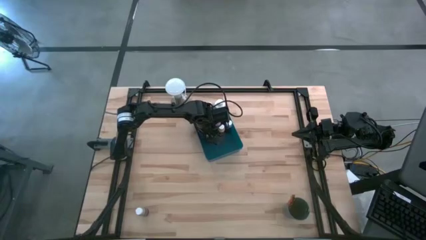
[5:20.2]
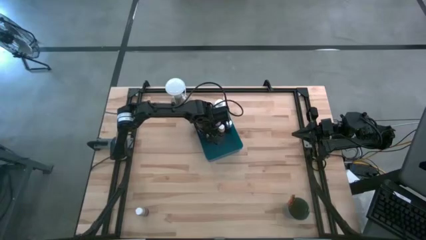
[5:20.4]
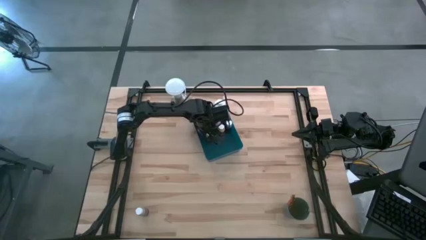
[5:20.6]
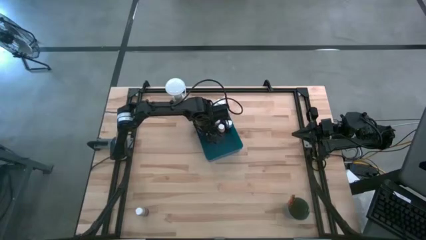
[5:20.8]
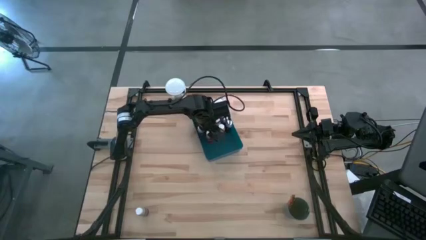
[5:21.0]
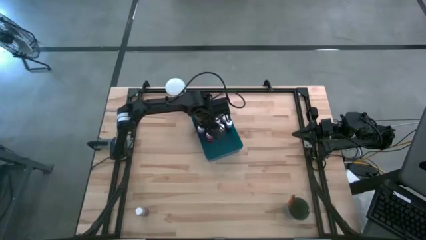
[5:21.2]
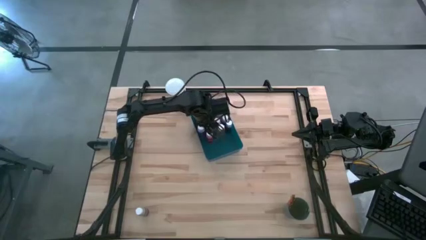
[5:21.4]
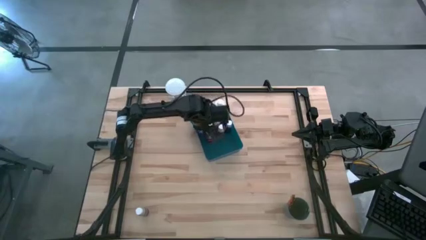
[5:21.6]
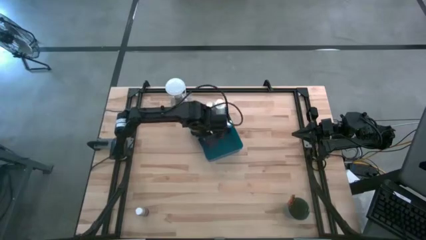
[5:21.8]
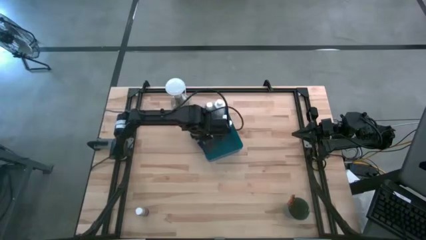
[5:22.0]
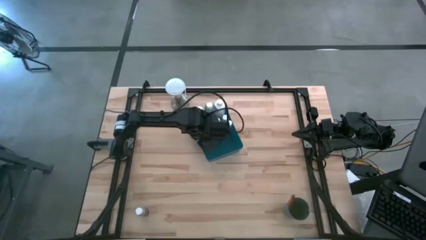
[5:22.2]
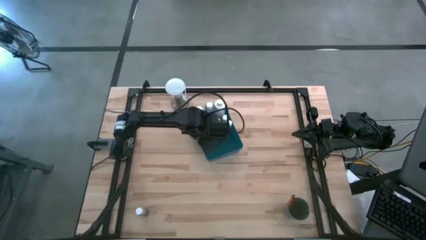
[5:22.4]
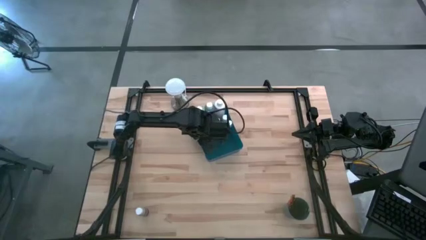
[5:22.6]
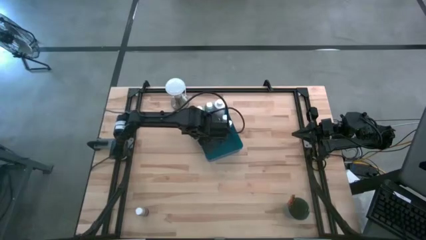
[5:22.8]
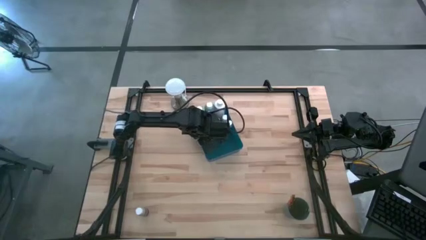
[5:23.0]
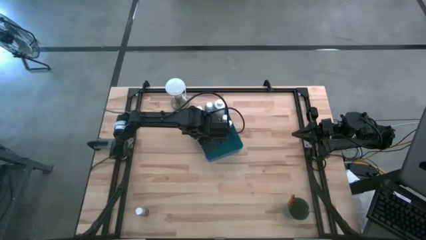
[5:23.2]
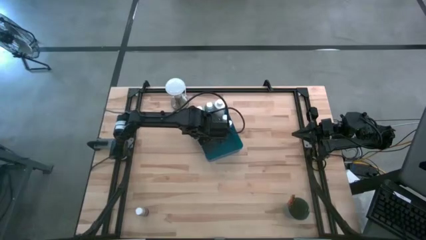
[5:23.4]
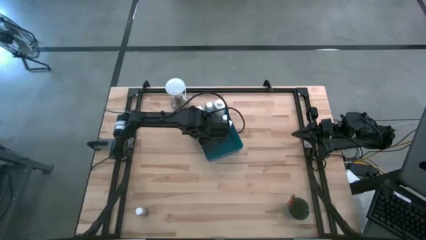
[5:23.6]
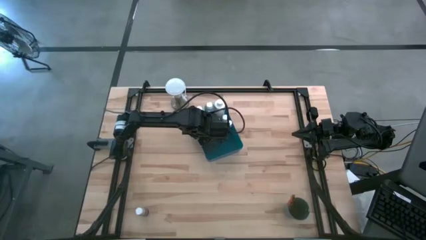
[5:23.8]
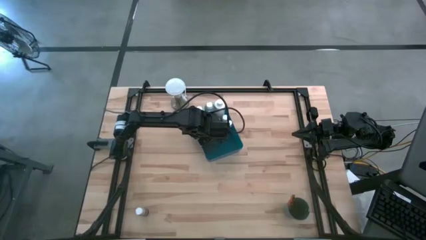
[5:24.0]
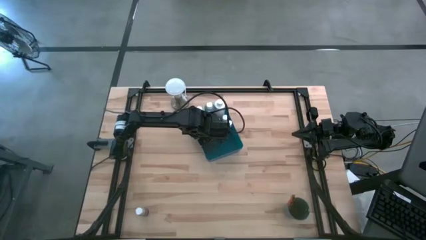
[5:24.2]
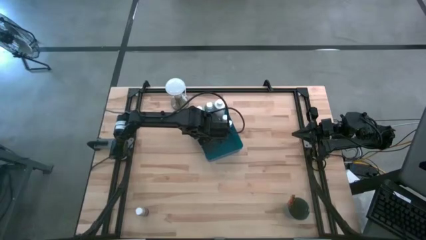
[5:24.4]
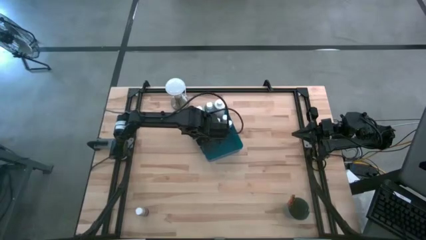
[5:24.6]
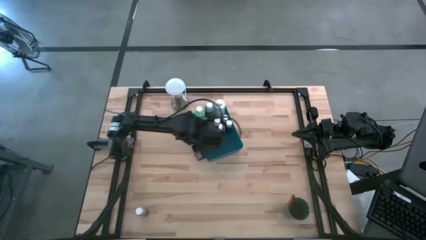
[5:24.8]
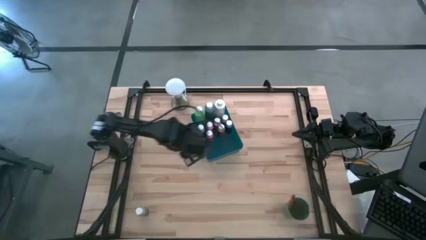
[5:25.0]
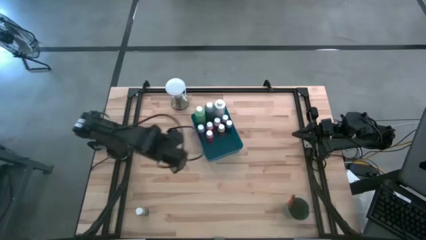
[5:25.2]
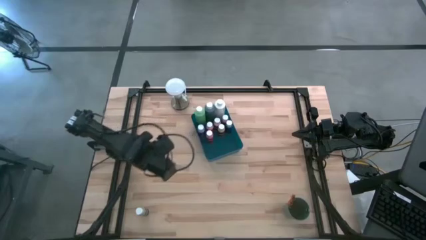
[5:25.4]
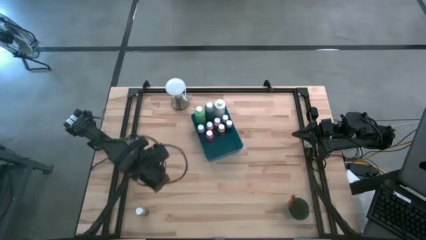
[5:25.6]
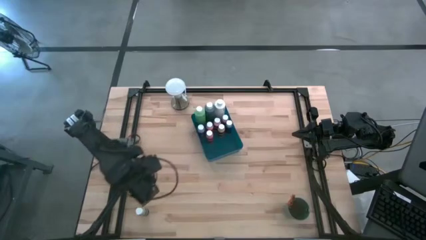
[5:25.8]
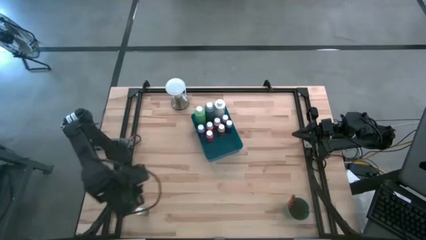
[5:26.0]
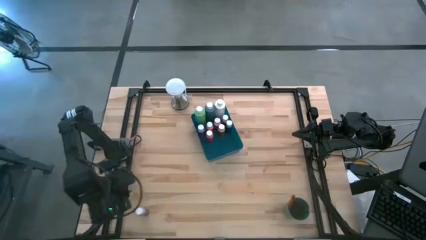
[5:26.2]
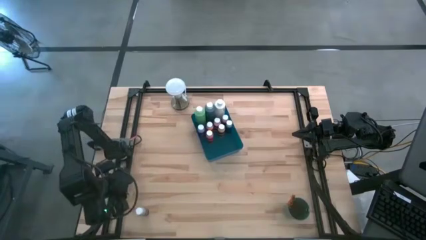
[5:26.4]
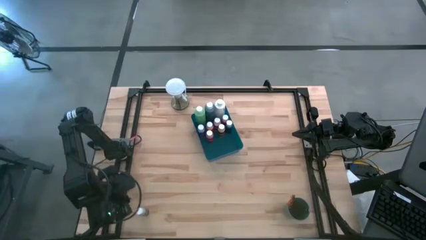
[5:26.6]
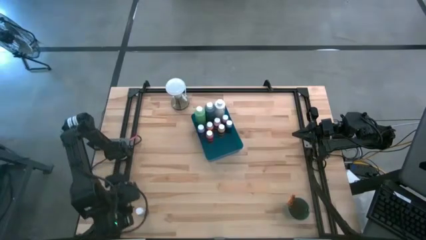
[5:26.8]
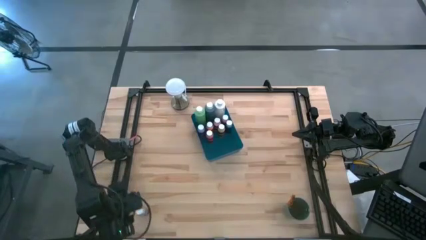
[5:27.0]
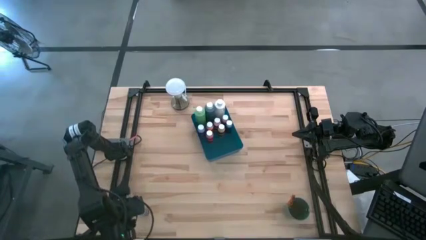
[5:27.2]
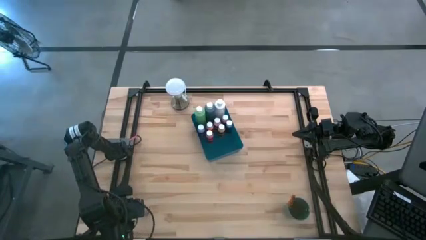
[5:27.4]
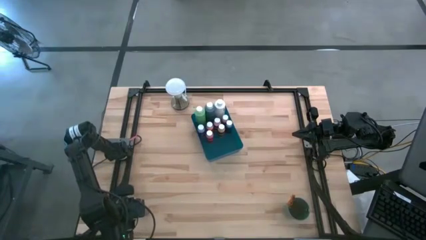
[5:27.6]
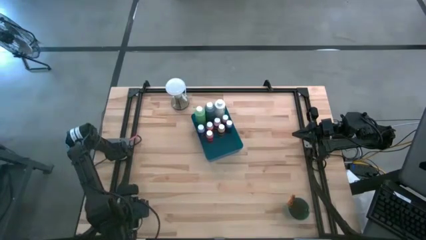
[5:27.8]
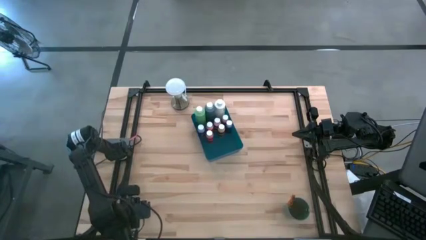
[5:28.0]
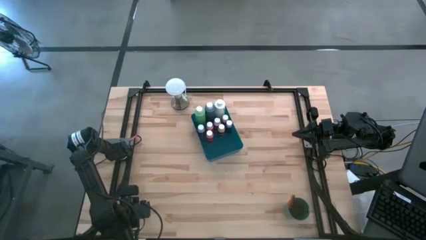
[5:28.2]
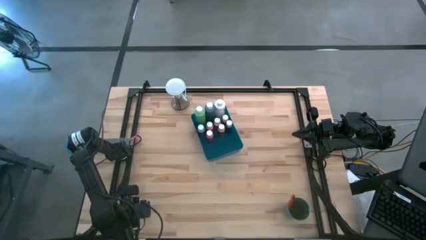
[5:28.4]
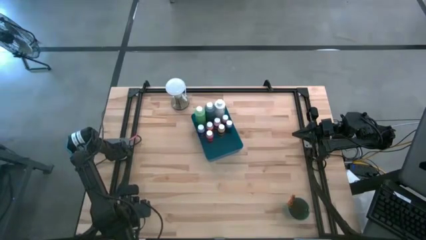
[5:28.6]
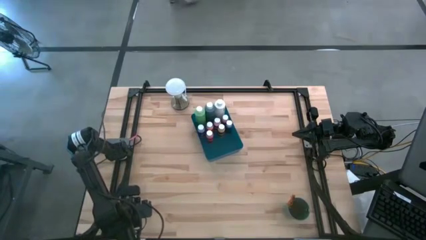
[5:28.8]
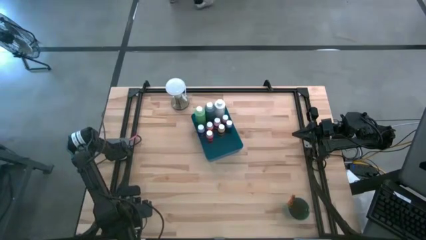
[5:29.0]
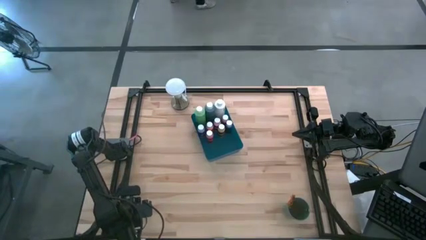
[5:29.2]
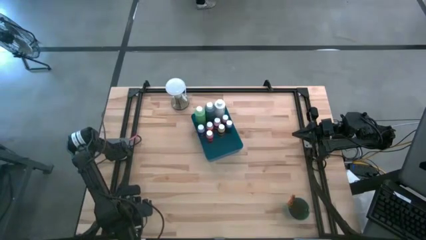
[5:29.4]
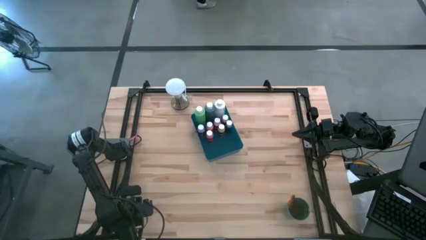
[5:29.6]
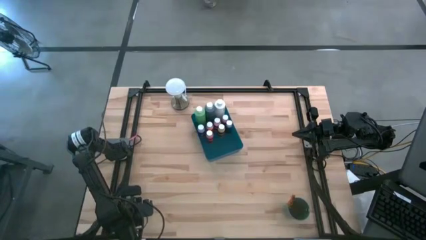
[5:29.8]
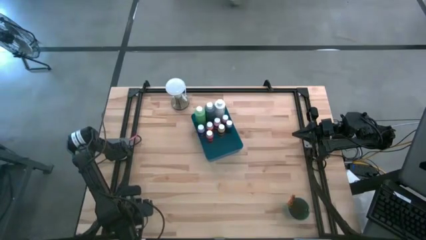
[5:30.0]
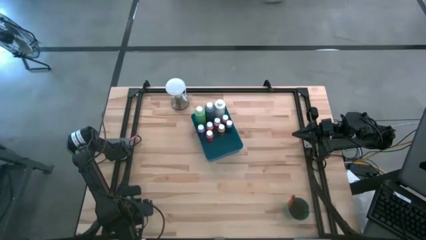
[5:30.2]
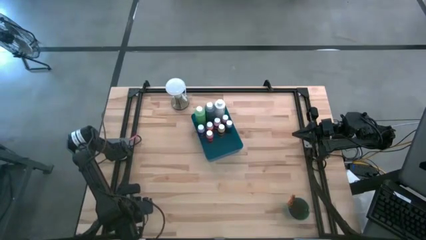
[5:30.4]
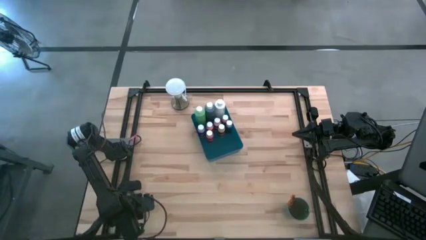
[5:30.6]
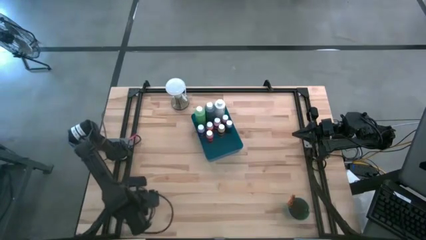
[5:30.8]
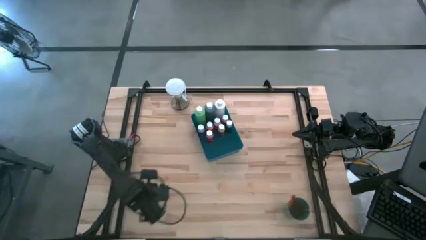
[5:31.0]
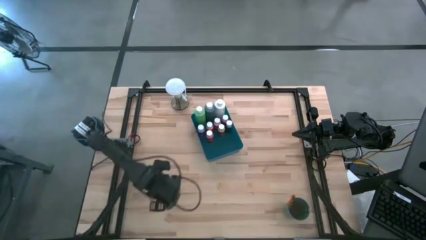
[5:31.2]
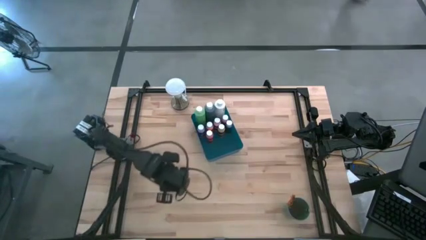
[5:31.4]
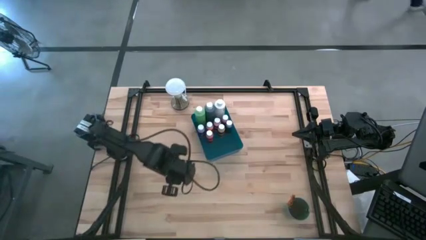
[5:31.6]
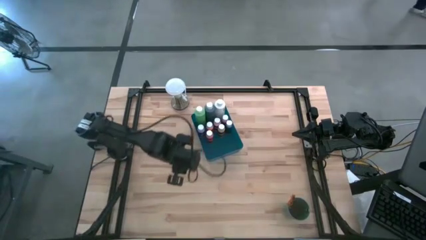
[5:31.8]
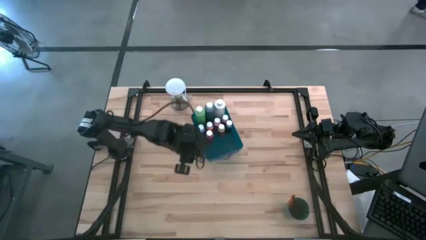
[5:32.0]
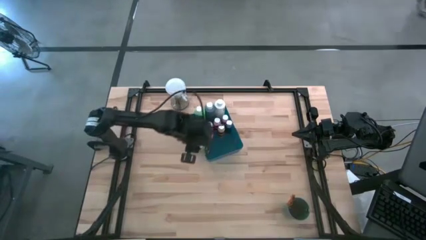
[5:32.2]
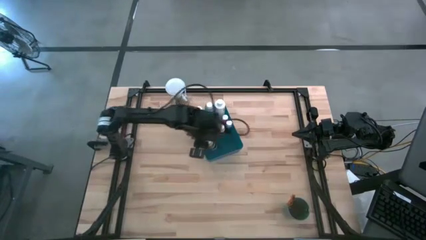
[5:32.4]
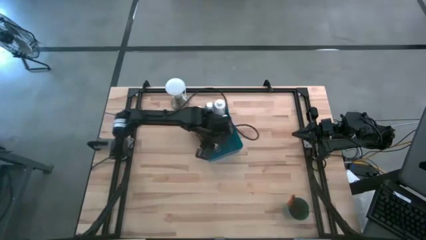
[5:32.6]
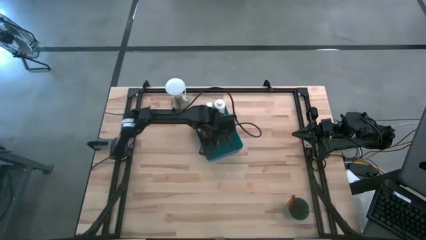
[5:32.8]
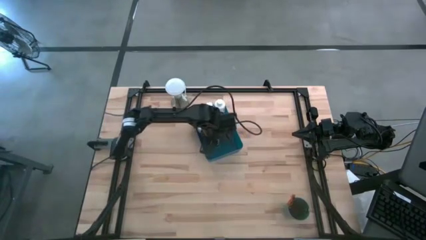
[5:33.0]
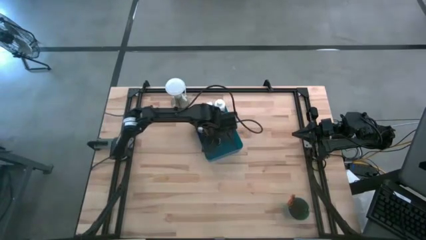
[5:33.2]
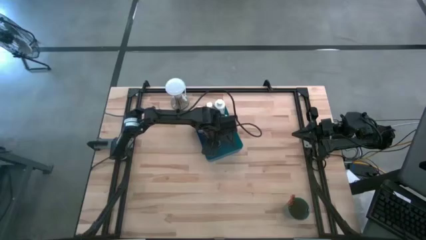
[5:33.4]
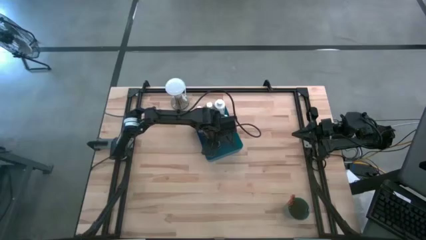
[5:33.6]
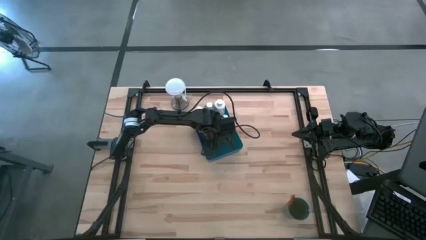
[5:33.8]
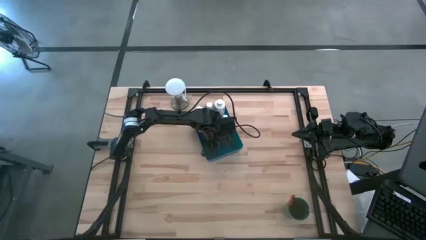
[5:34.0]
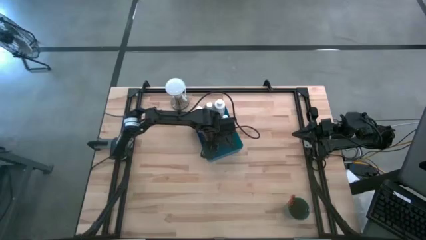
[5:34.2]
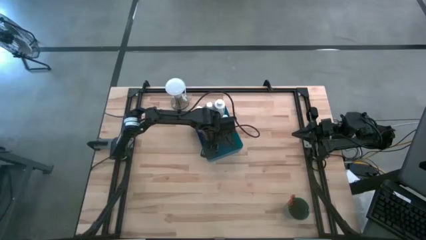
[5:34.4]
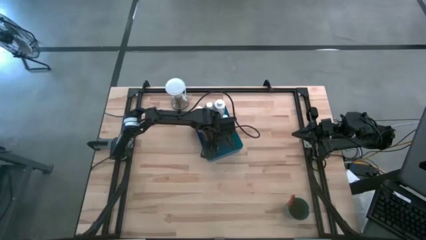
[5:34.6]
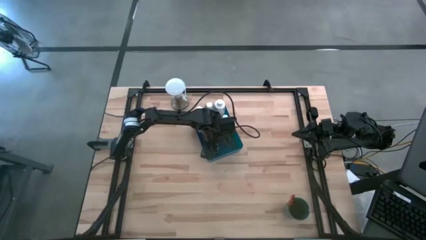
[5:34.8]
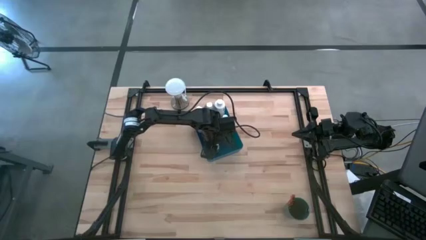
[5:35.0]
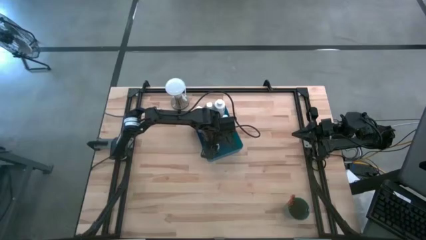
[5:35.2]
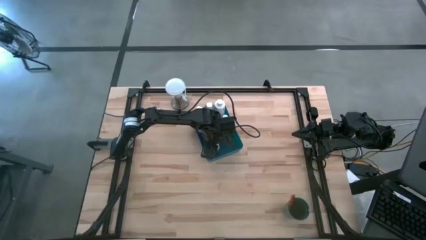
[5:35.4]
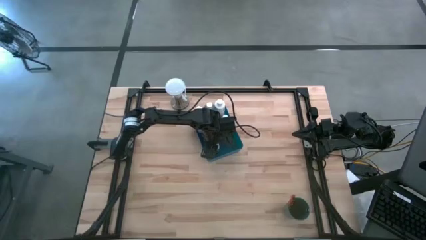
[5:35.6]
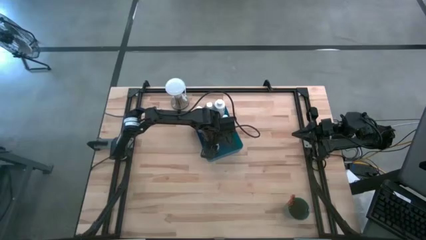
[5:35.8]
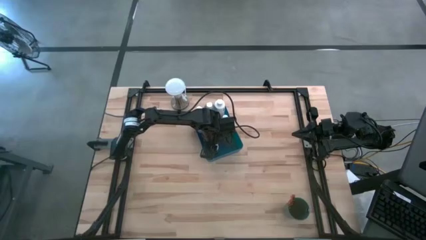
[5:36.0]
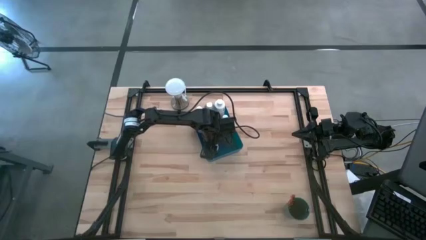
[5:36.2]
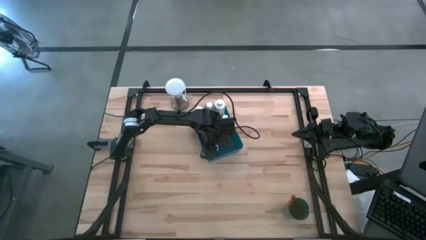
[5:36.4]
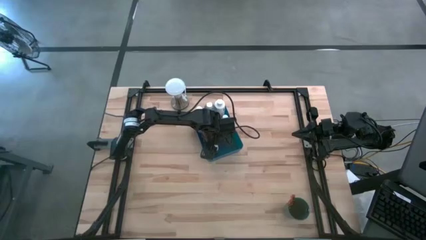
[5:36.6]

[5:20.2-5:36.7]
Task: Pick & Place Paint Supplies
Put the gray paint bottle into the blue bin
